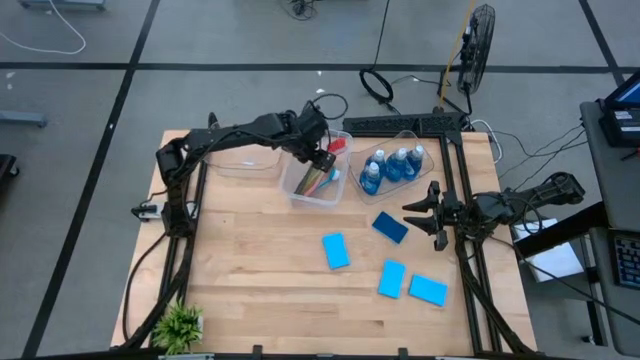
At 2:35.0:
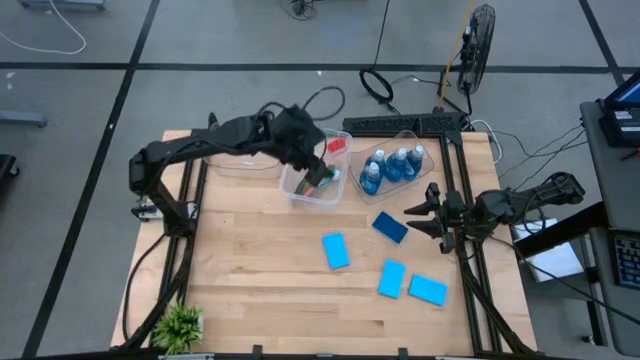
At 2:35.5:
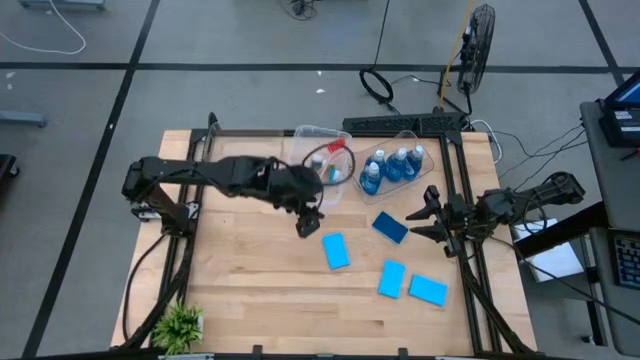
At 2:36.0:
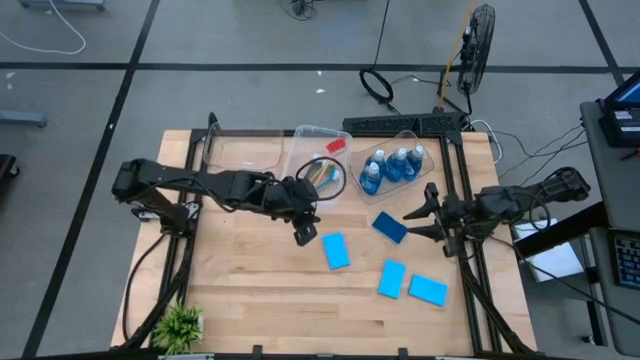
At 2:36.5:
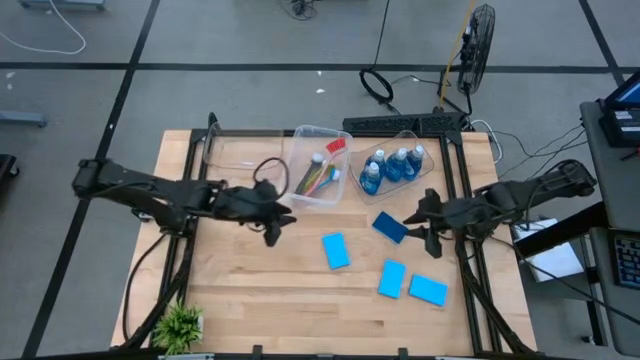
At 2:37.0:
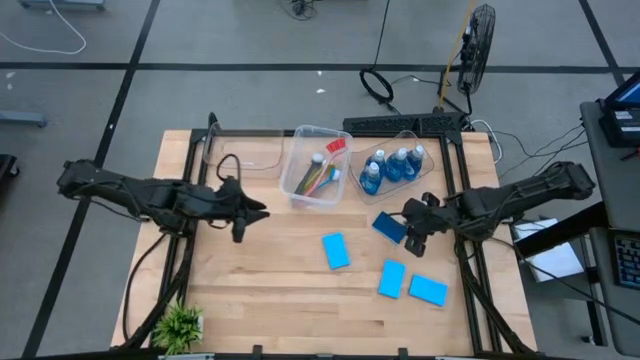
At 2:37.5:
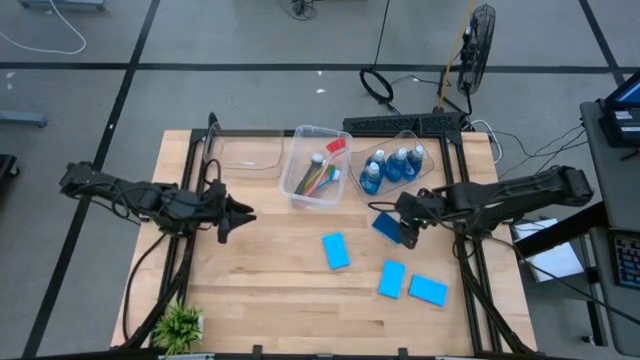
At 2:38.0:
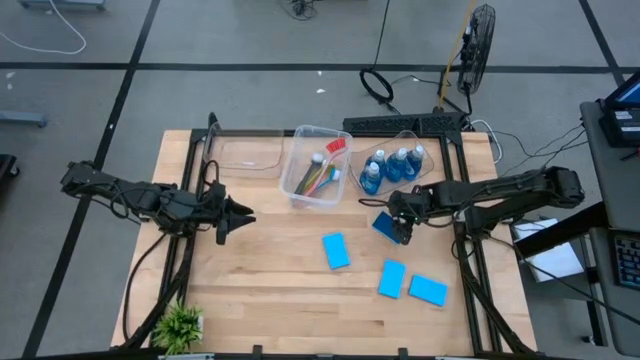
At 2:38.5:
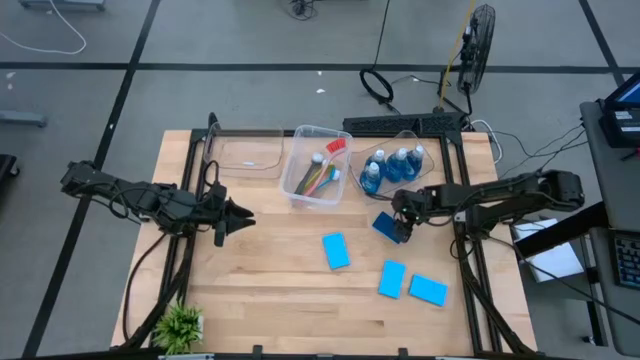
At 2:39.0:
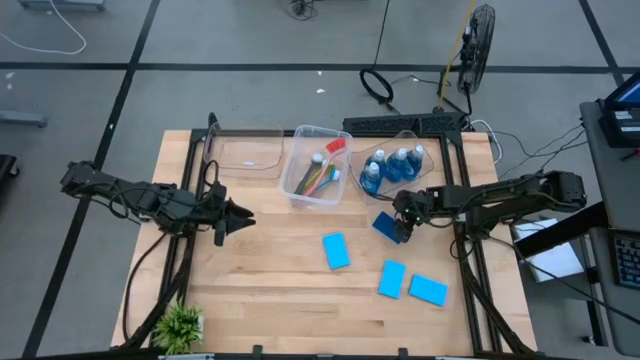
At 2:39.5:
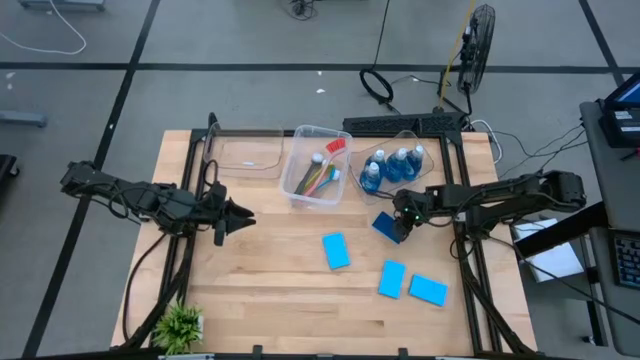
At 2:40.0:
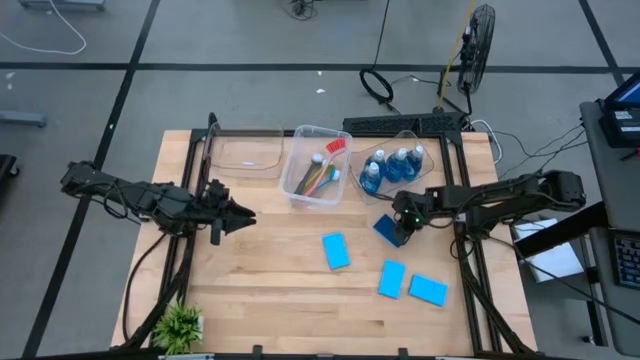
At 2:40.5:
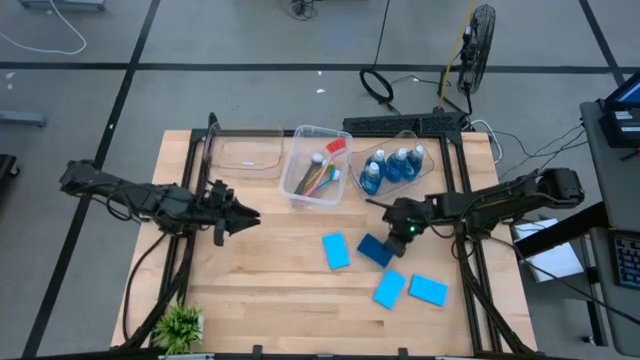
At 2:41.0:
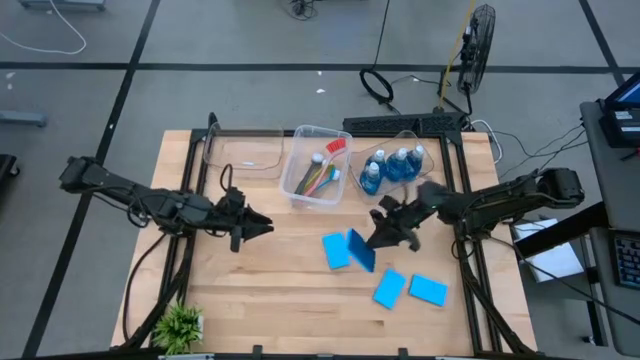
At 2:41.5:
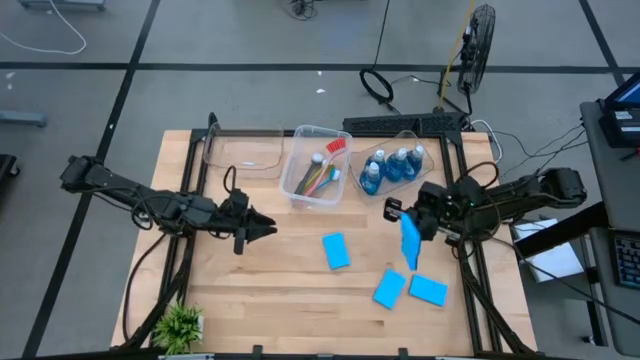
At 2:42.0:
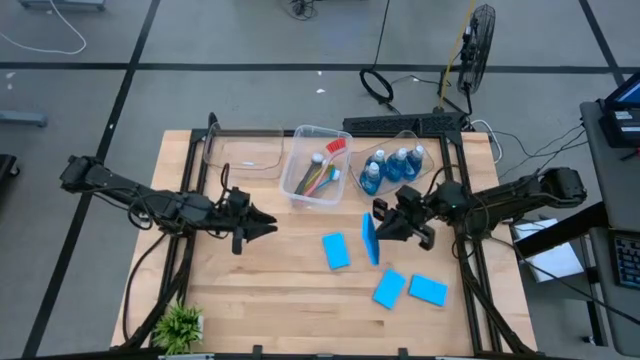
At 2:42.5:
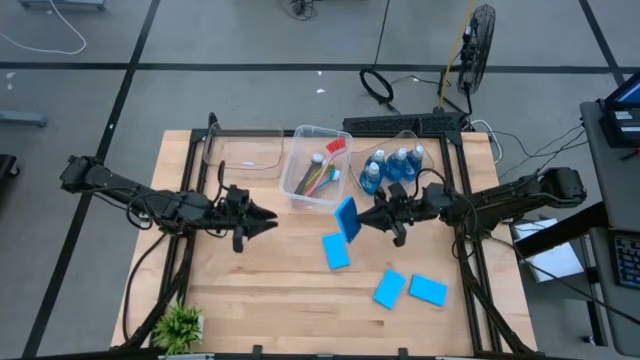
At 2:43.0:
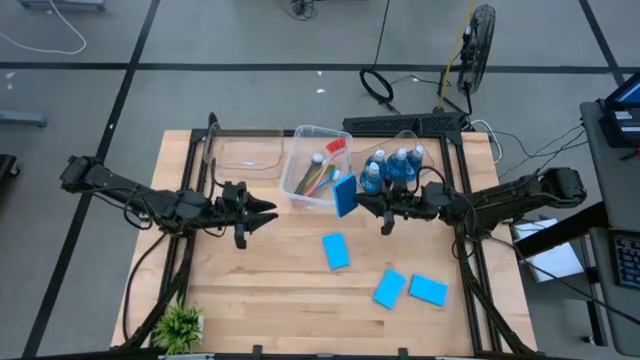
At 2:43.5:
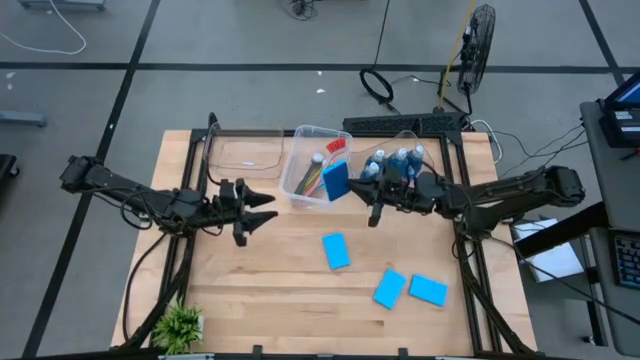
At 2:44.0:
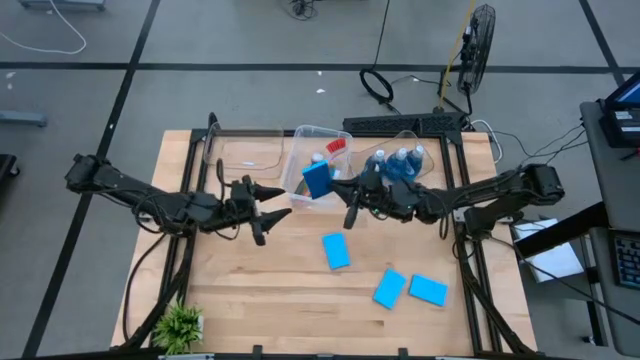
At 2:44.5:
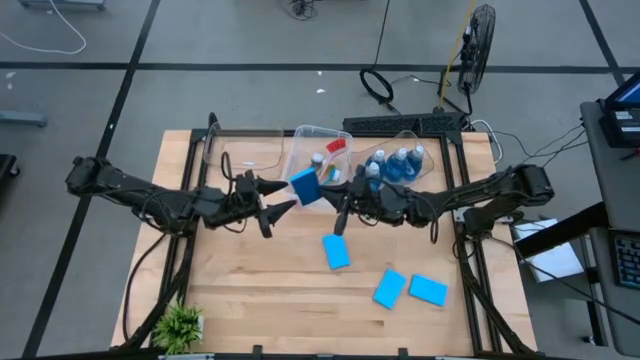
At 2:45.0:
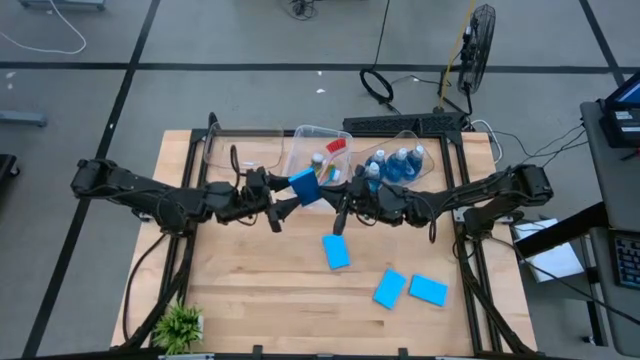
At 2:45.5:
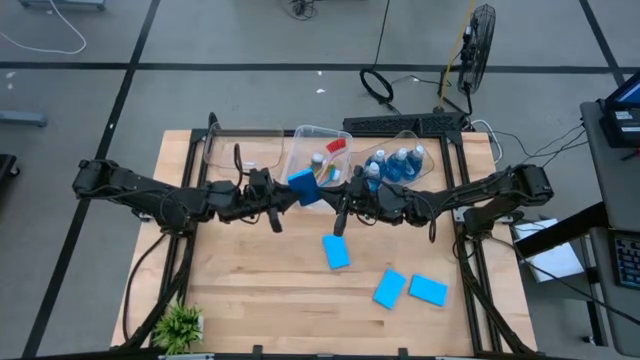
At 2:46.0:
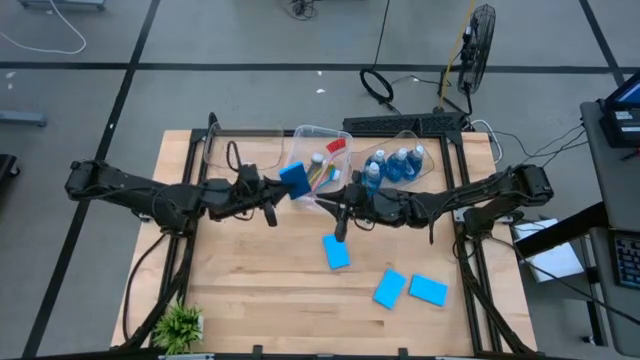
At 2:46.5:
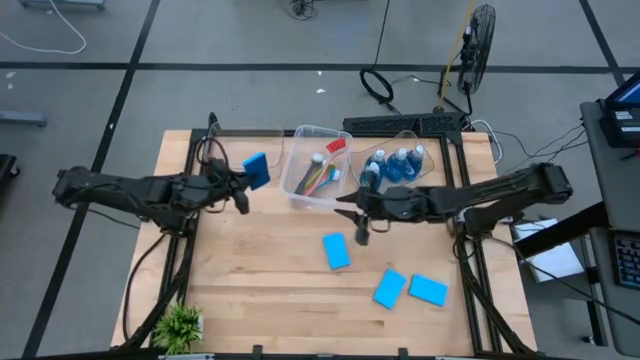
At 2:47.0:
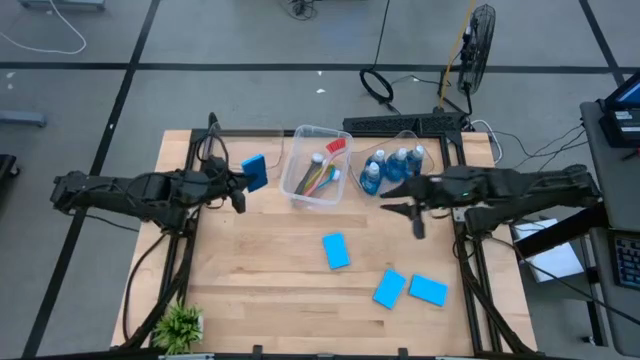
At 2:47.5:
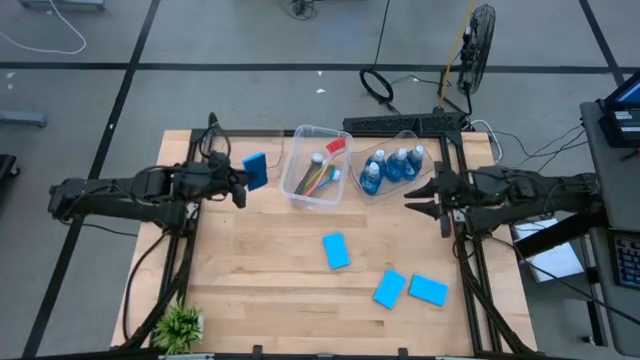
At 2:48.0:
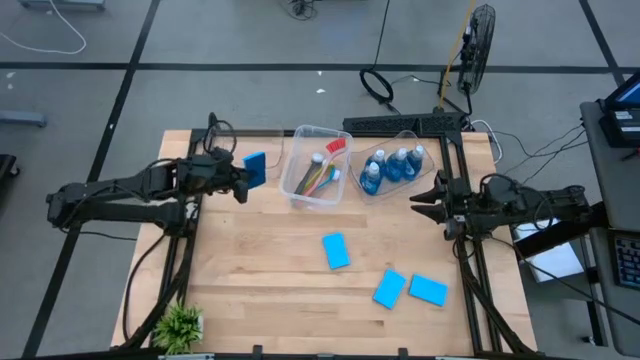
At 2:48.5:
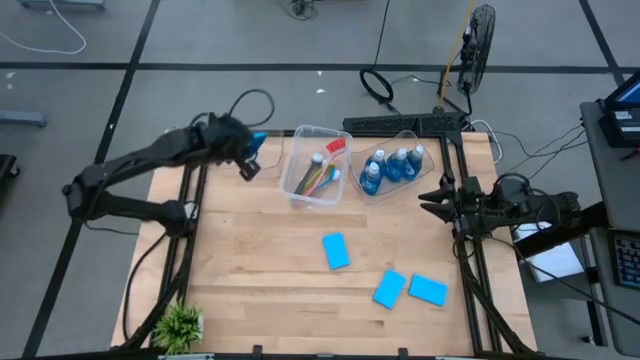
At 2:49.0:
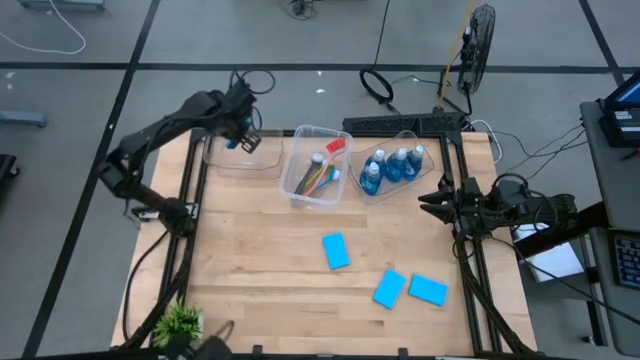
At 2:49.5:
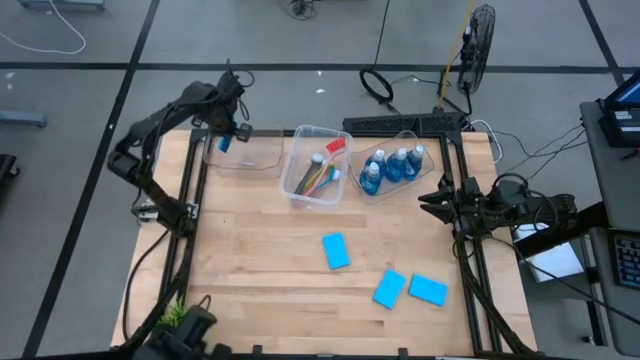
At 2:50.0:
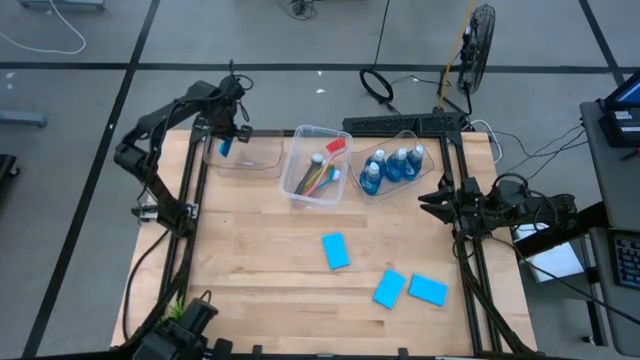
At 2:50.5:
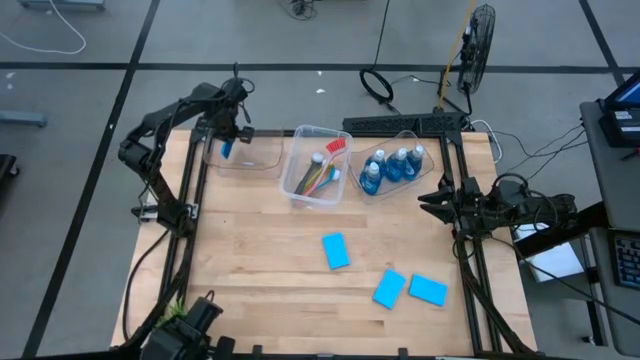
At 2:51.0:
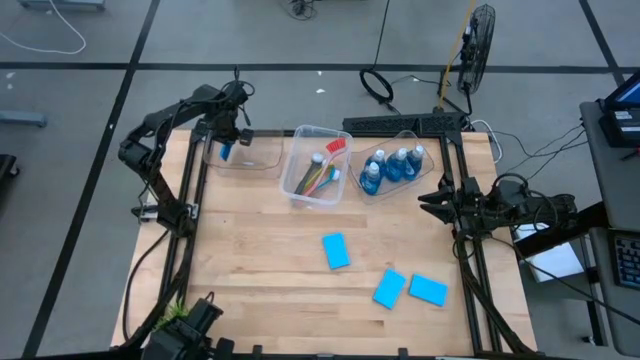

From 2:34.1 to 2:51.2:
Task: Pick & Place Kitchen Sink Supplies
Put the blue sponge into the left transparent bin

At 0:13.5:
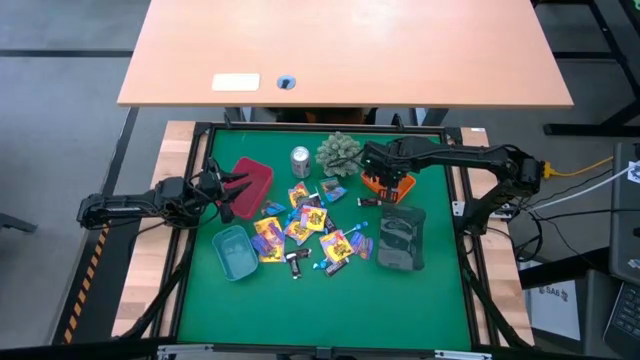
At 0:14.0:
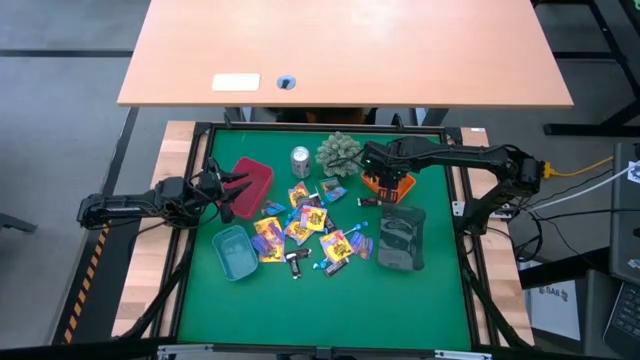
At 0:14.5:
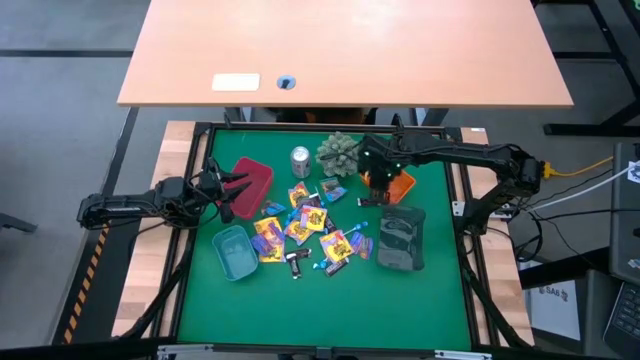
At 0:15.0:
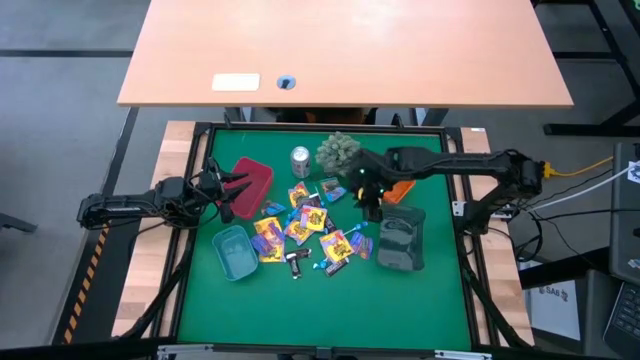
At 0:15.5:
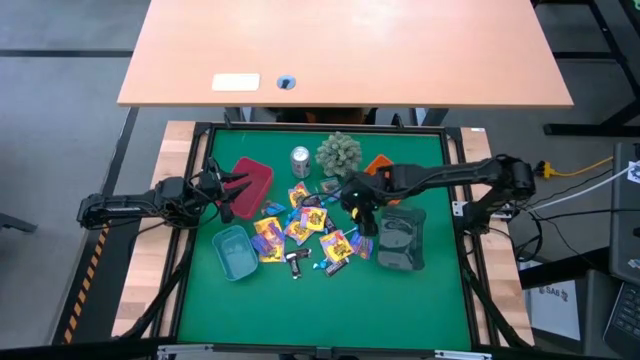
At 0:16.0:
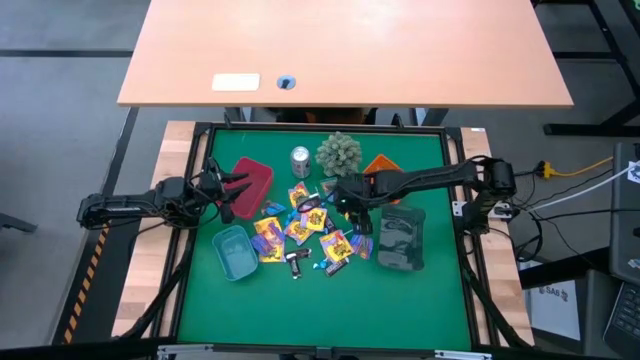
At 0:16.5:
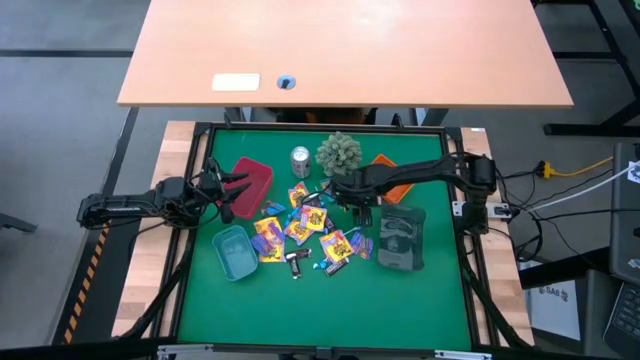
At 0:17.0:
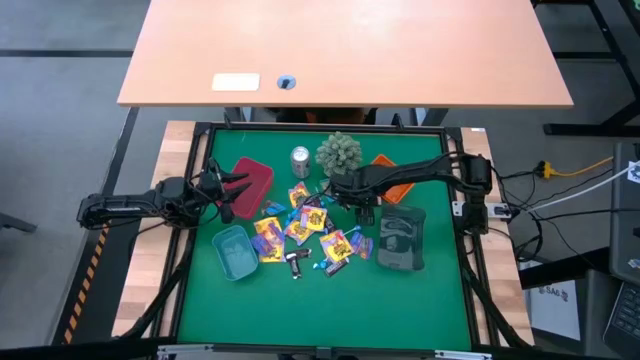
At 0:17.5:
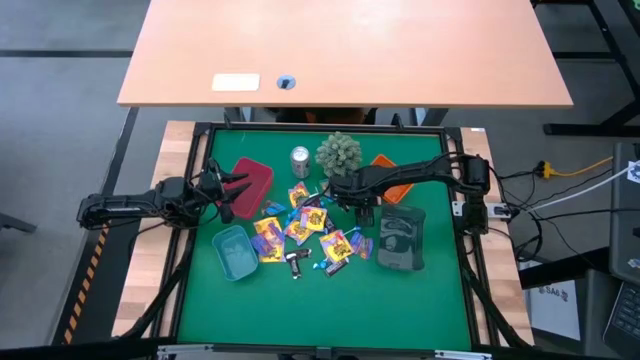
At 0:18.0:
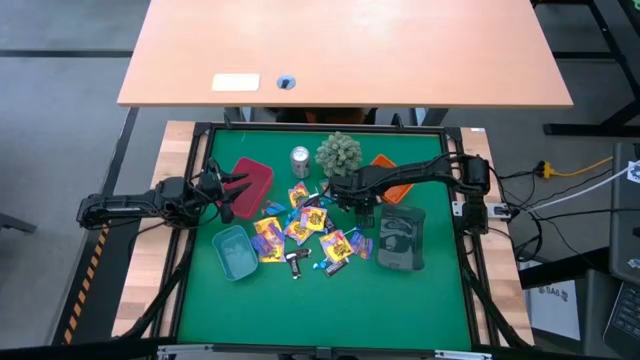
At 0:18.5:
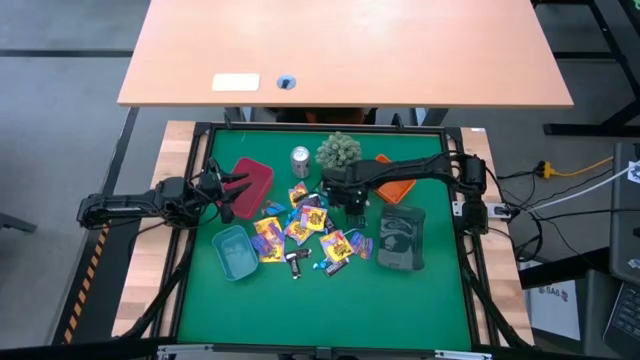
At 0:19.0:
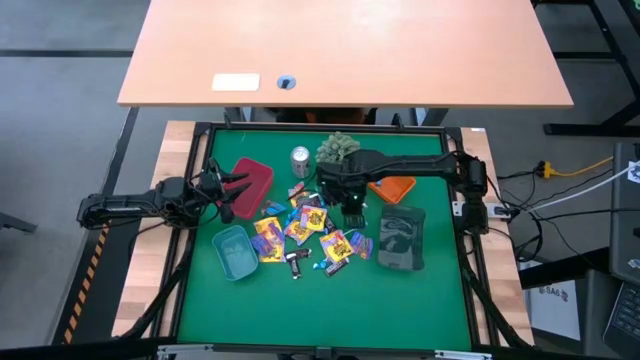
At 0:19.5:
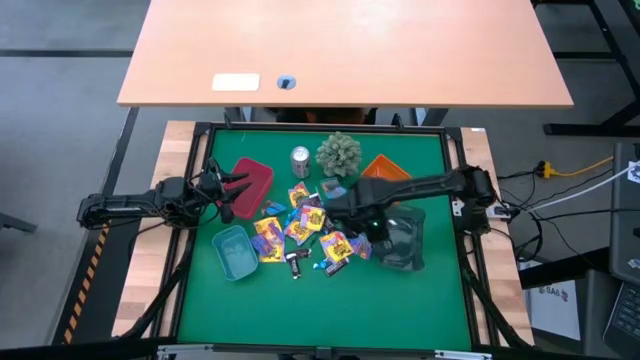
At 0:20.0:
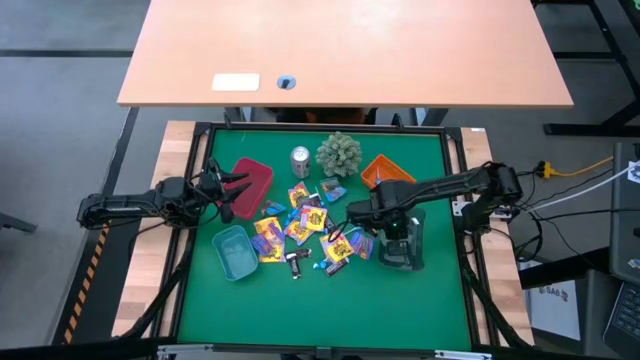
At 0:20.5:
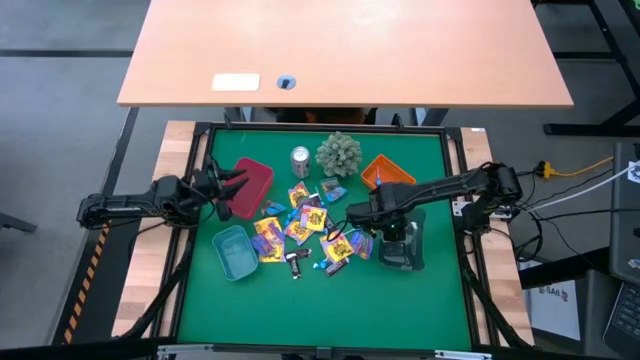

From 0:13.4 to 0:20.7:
Task: Sort candy
Put the brown chocolate candy into the black bin
